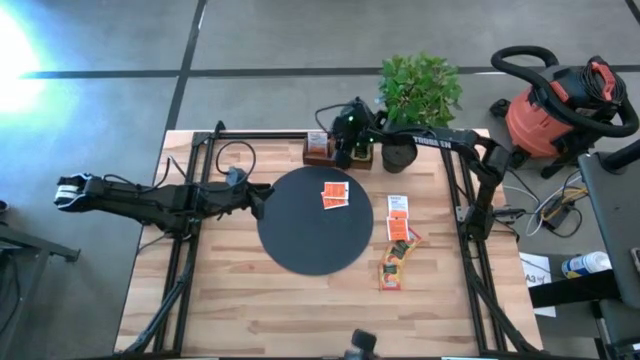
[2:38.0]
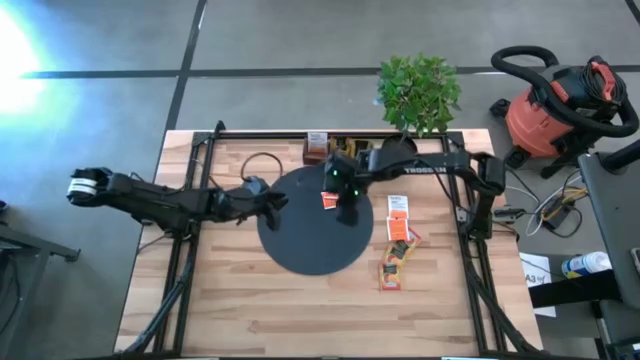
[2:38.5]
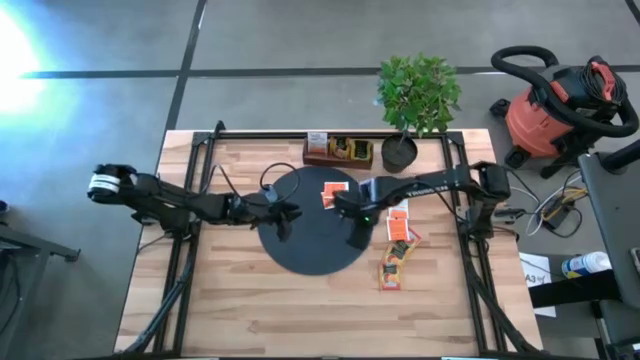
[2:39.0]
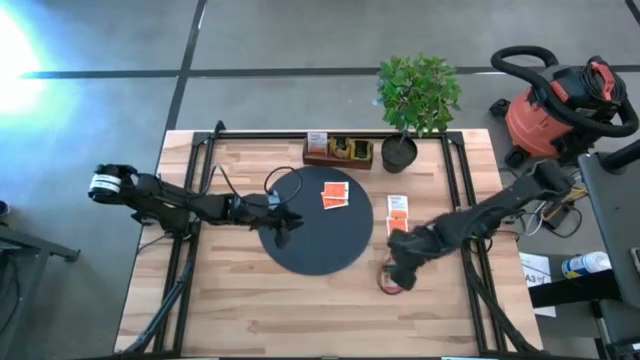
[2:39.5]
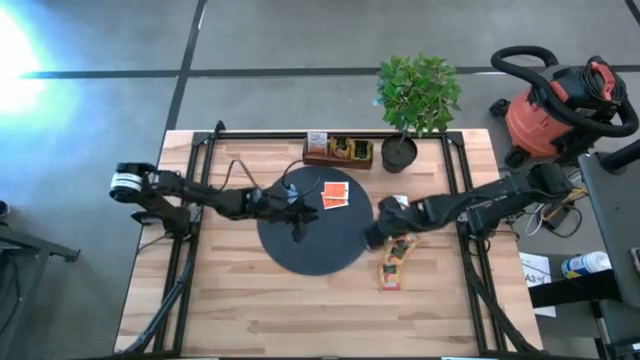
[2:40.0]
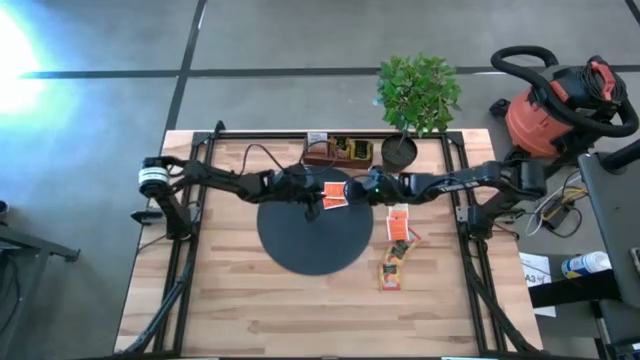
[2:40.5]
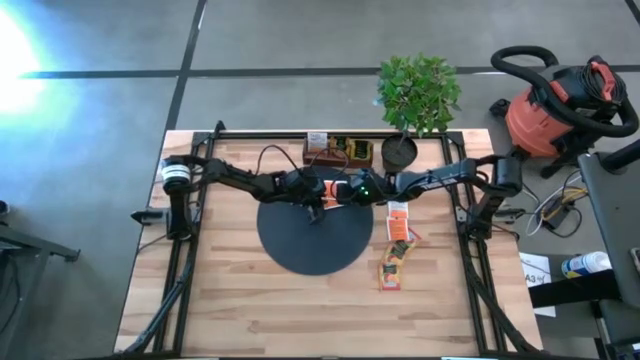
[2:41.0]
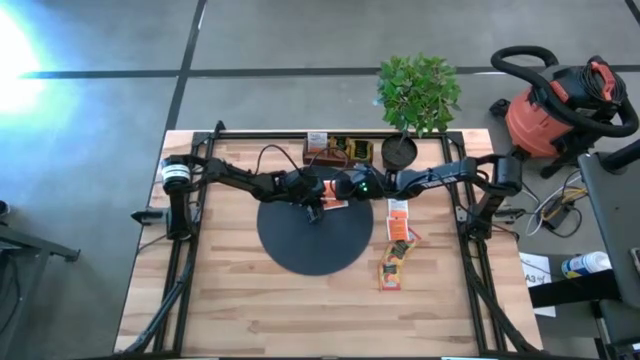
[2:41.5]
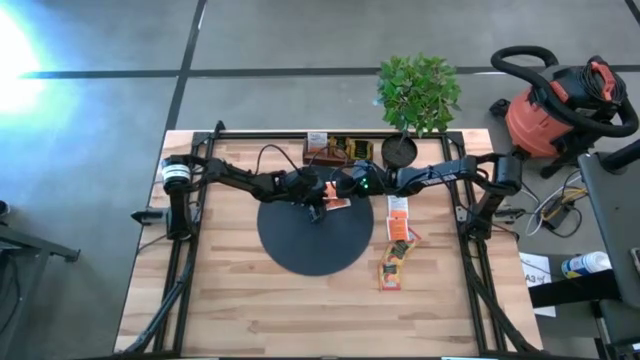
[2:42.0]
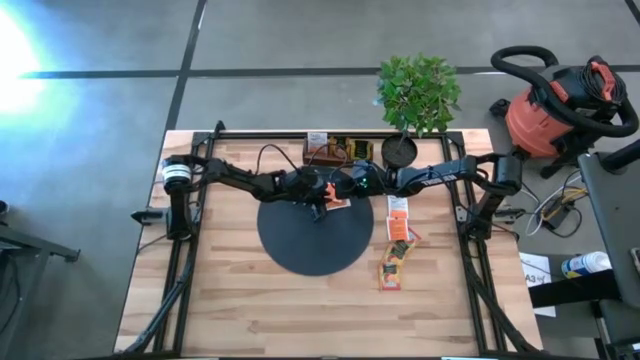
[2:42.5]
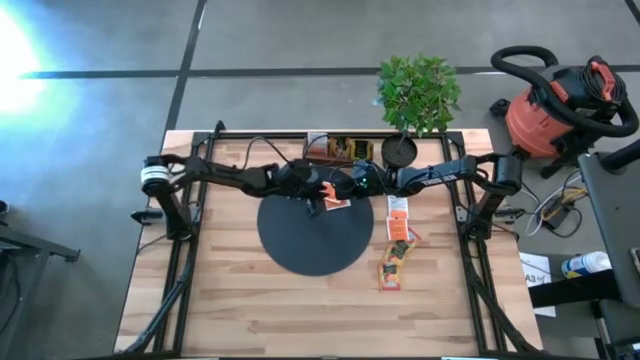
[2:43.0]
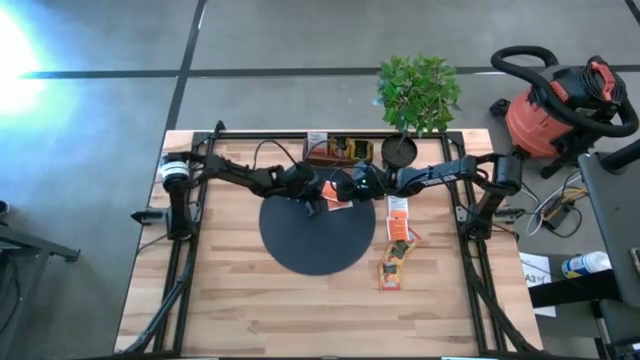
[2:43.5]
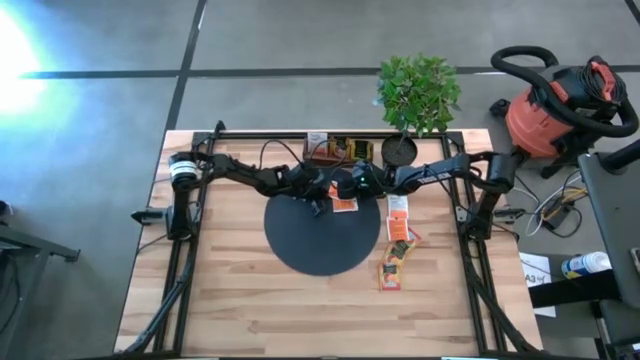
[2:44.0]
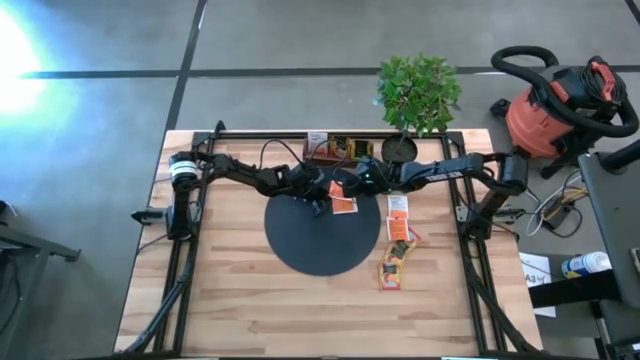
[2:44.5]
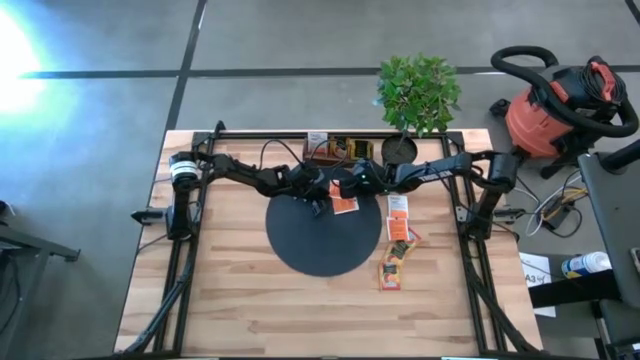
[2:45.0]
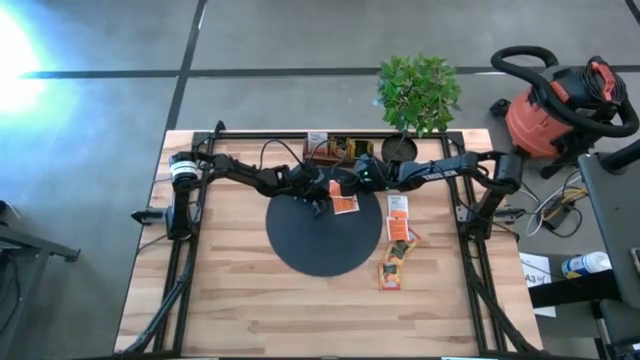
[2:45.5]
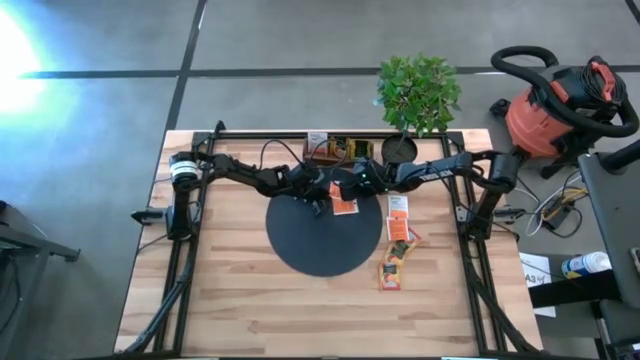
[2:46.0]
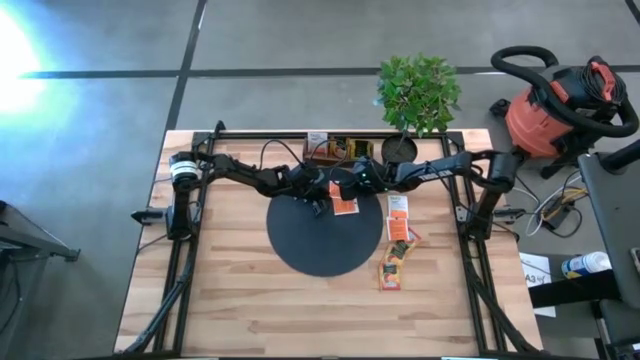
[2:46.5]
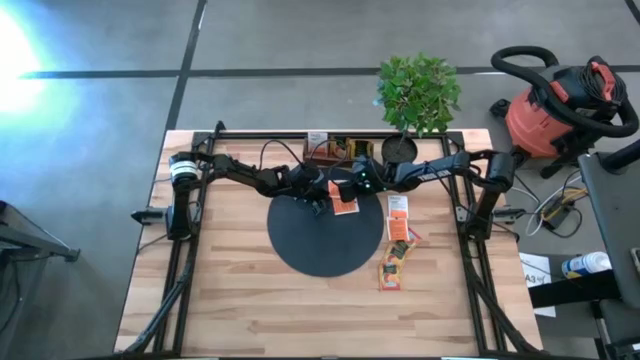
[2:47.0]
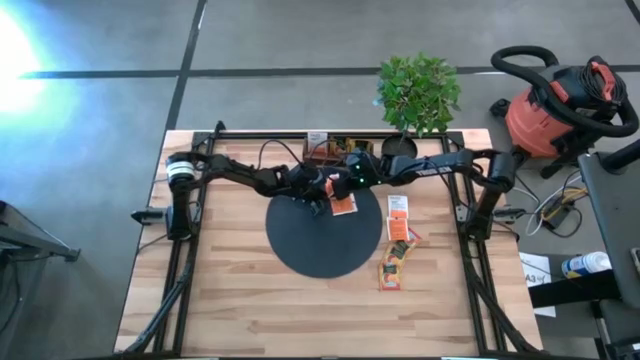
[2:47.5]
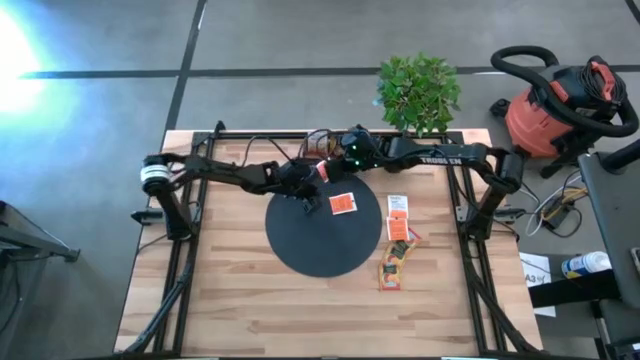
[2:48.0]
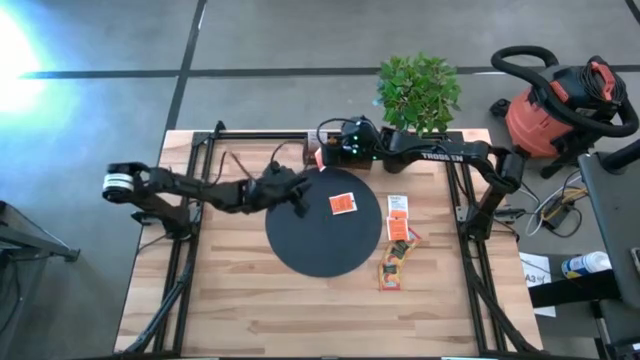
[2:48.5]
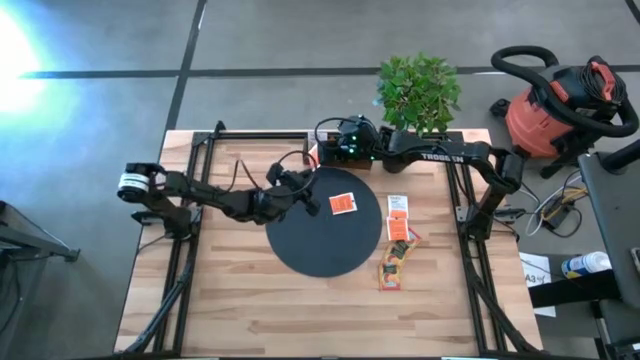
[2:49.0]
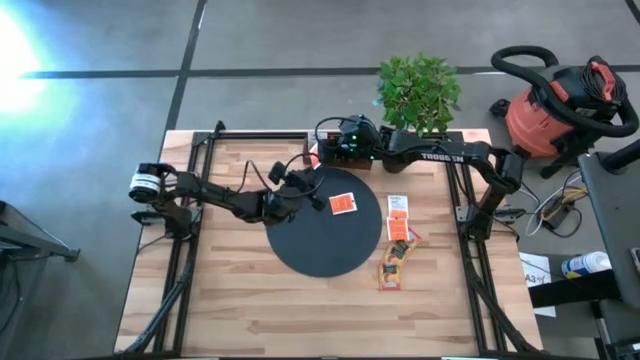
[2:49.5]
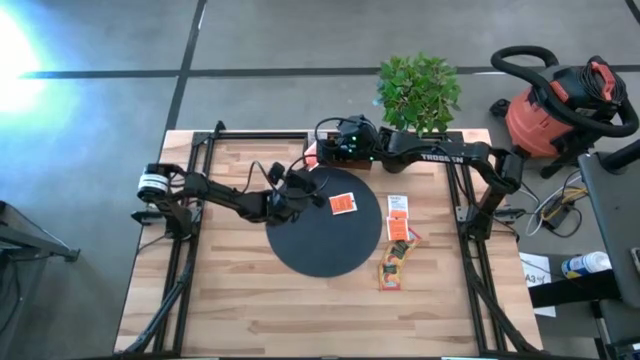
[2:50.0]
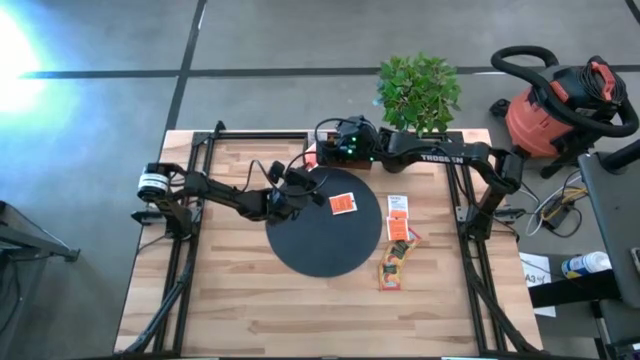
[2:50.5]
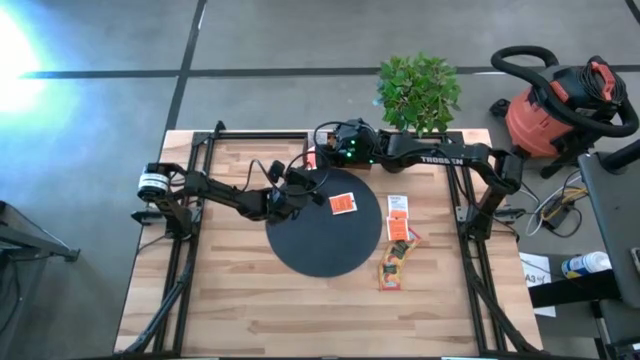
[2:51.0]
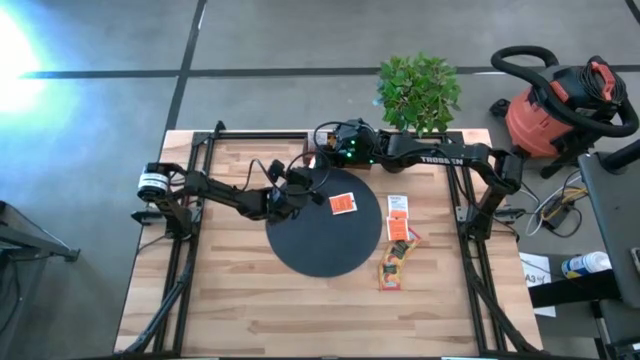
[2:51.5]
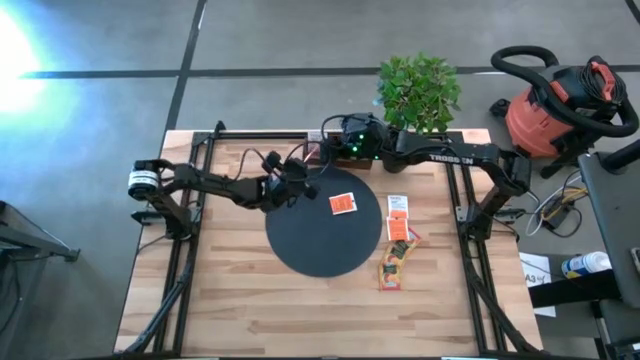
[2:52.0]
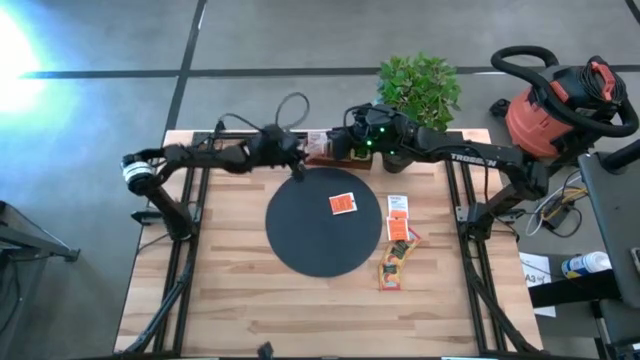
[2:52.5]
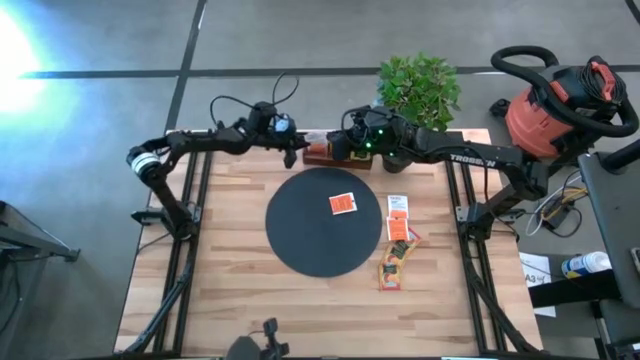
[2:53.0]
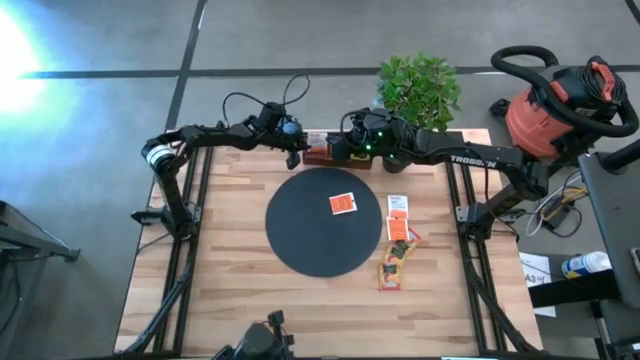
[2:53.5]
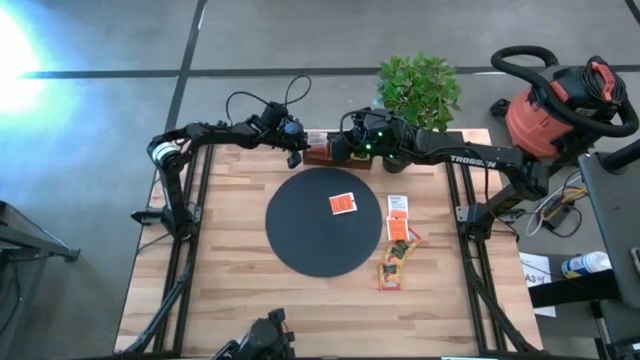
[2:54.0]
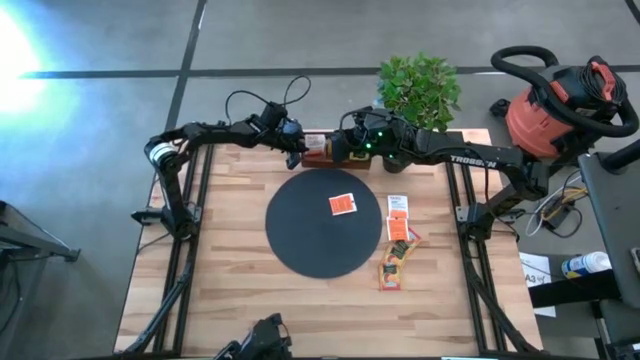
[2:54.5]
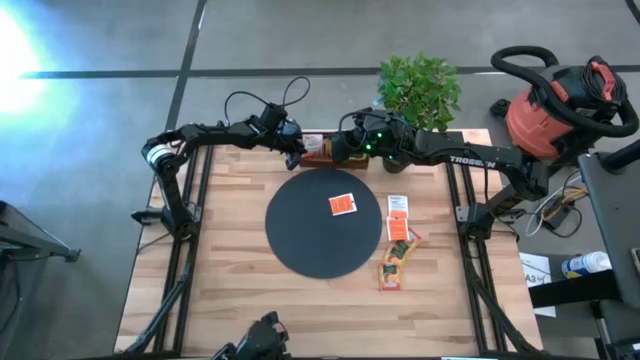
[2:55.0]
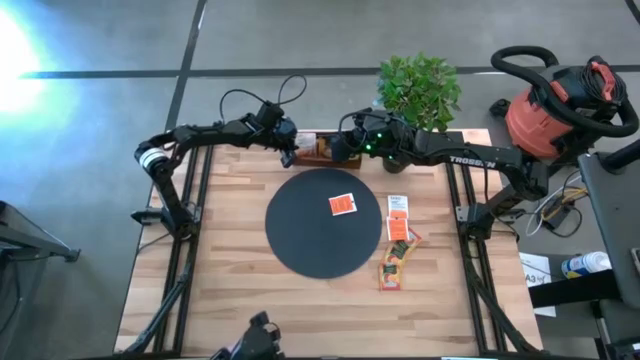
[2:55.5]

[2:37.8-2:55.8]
Task: Pick & Place Tea
Put the white tea bag into the left section of the brown wooden organizer
